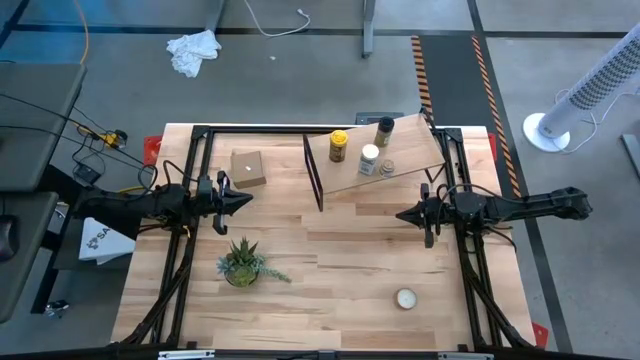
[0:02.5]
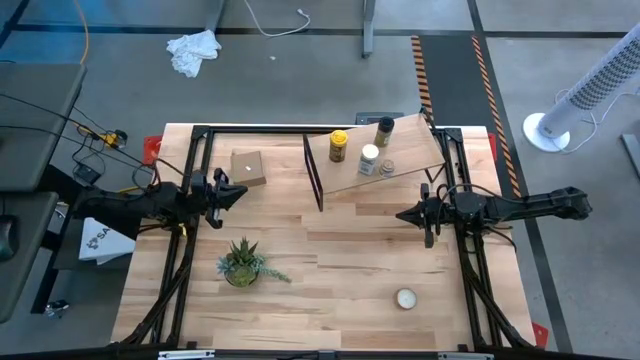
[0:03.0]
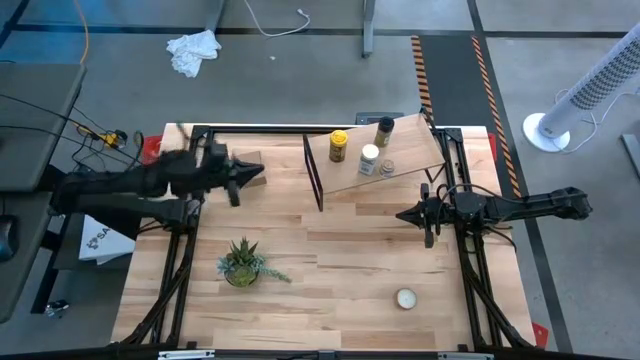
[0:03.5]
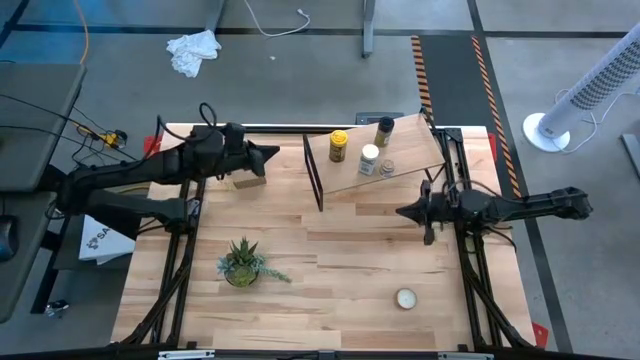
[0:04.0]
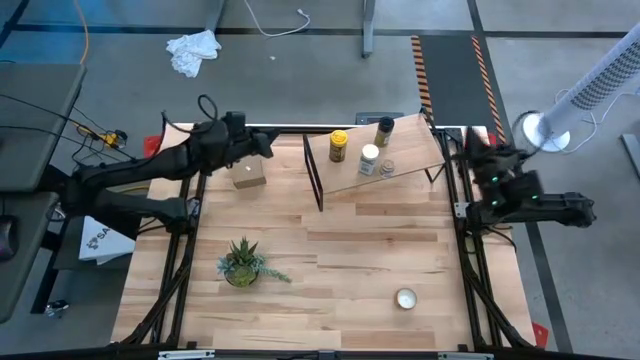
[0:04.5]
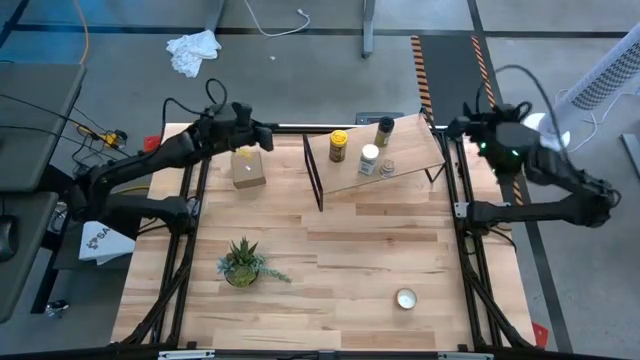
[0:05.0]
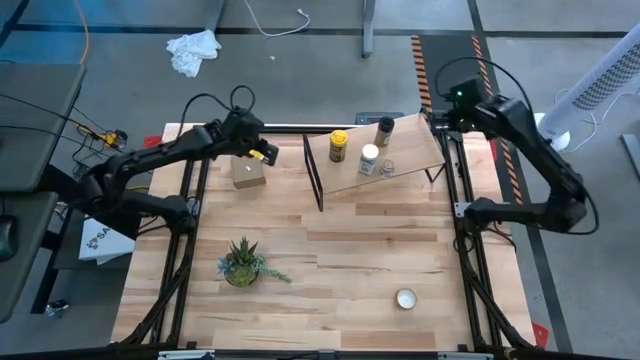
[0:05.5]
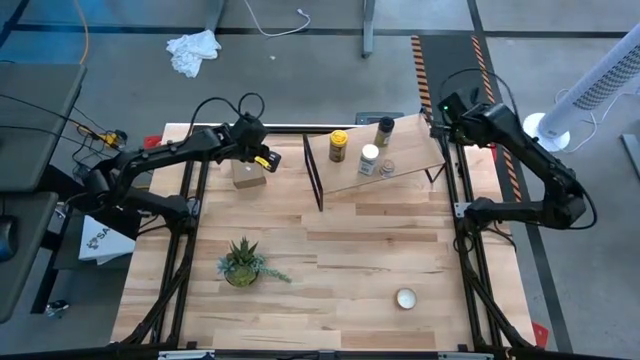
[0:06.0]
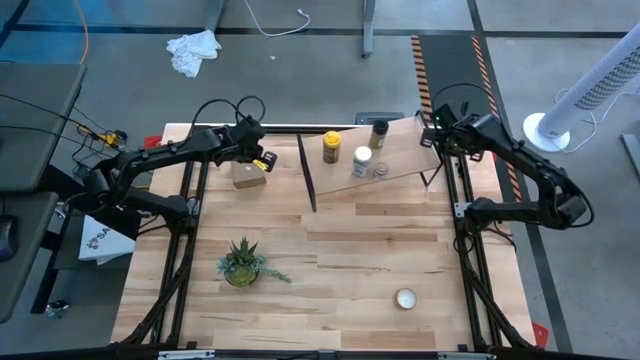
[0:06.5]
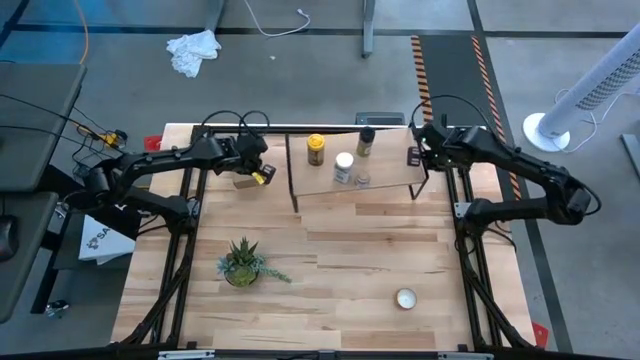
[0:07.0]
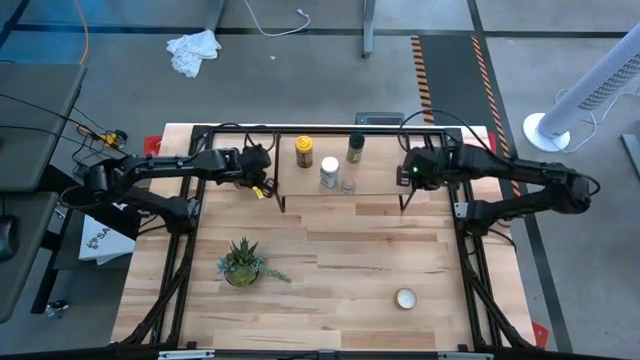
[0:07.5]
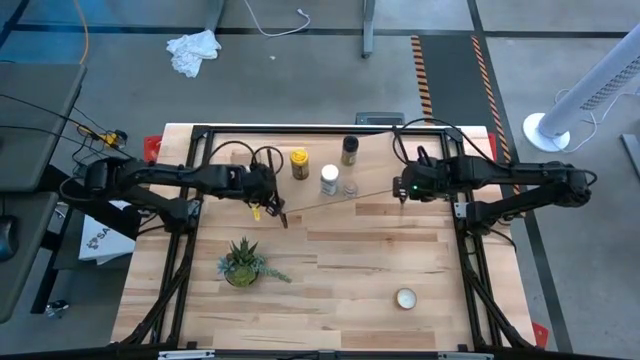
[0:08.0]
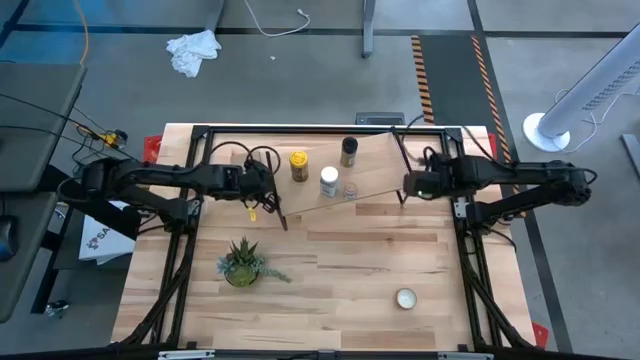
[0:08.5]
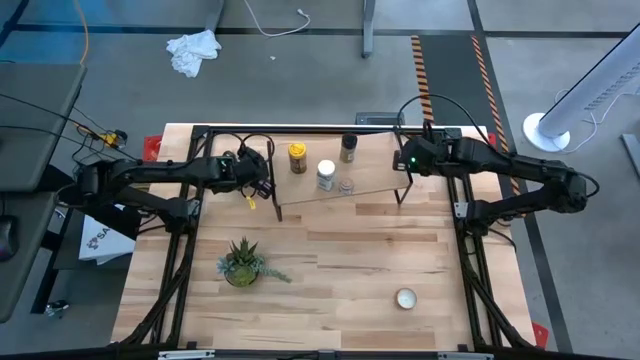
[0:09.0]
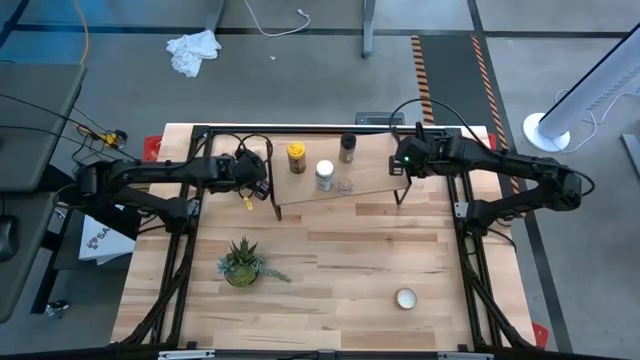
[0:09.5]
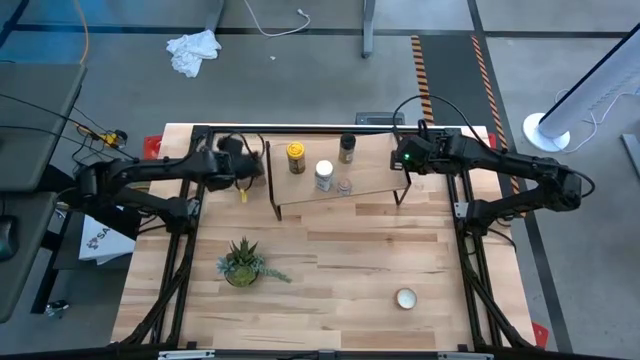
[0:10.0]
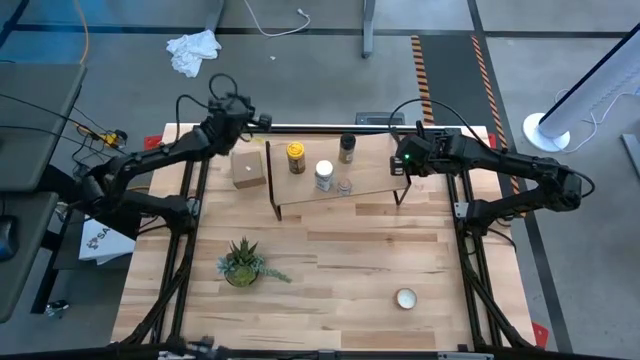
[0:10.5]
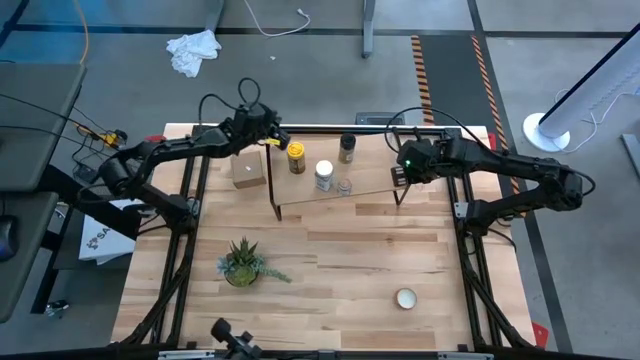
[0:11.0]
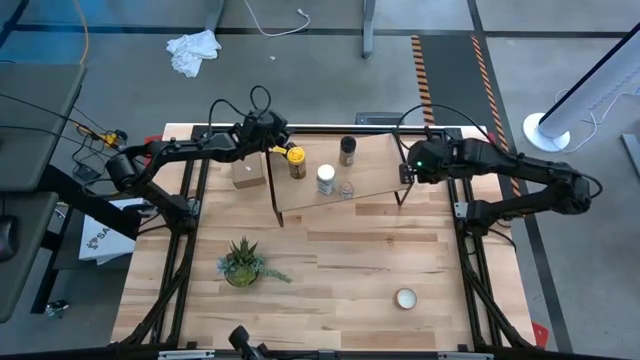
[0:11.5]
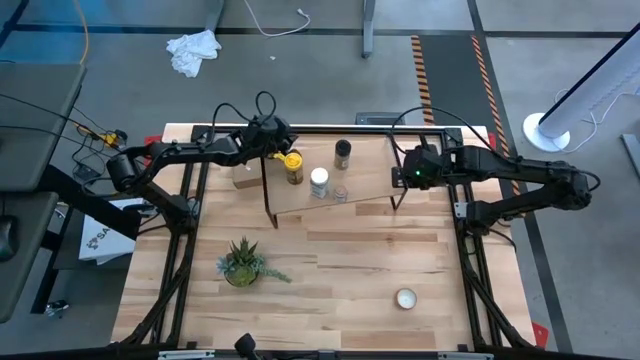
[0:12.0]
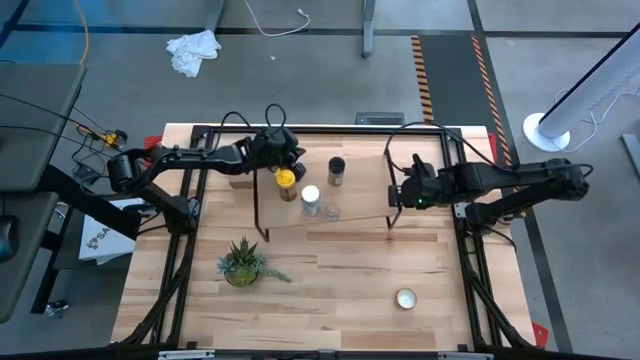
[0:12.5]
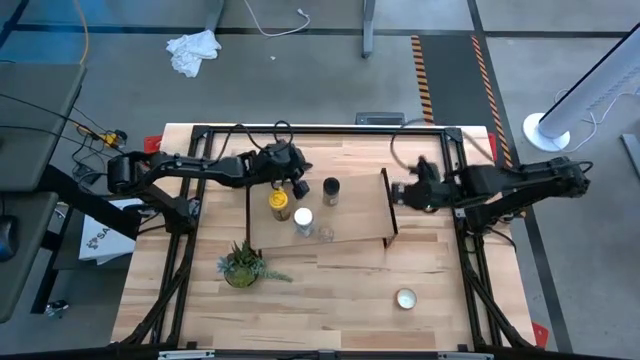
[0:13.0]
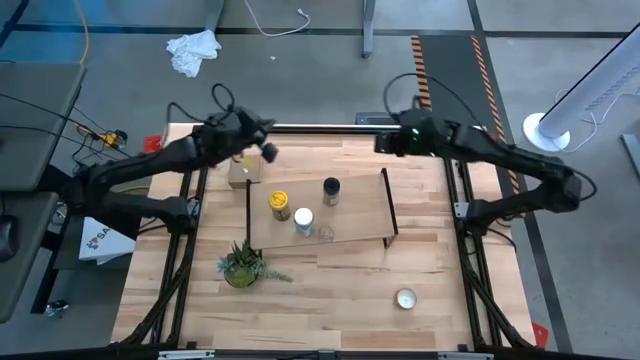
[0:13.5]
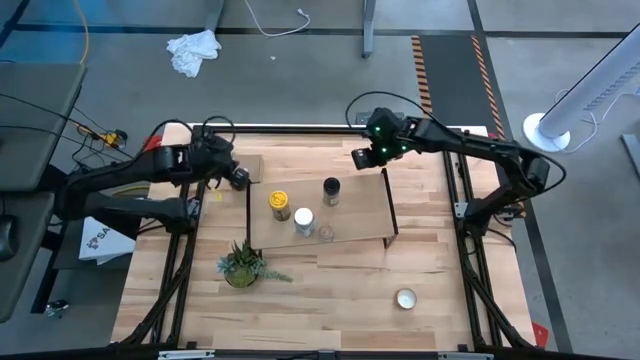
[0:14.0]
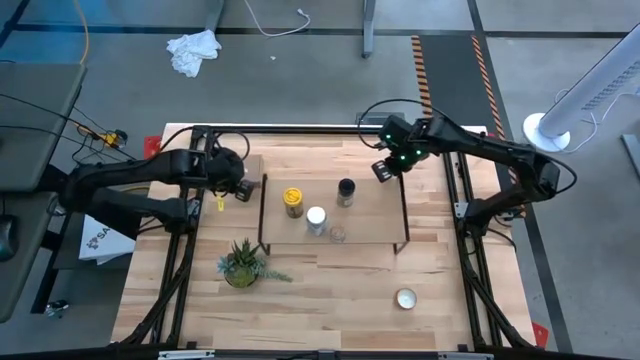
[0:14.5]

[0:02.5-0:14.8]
Task: Shelf spices
Move the shelf to the center of the table

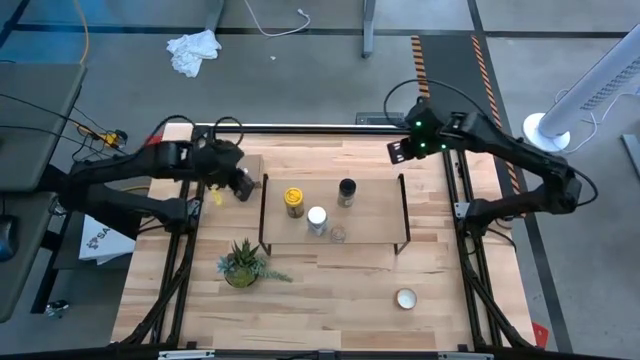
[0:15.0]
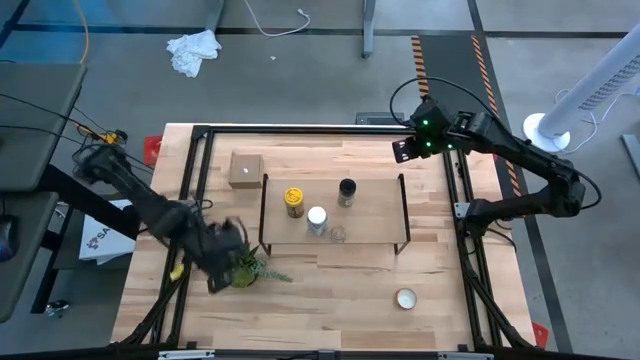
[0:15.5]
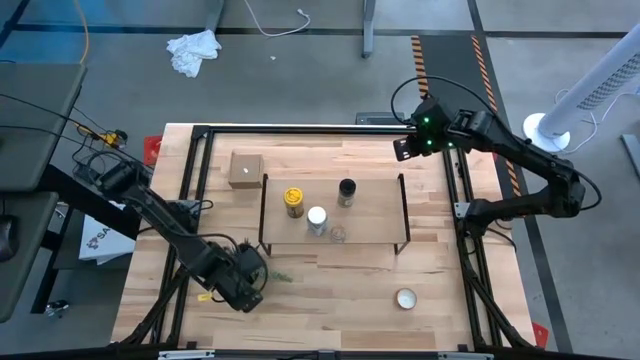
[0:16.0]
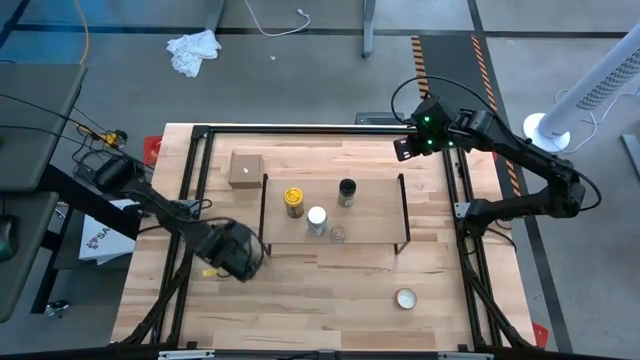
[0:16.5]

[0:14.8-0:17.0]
Move the black vase plant to the middle left of the table

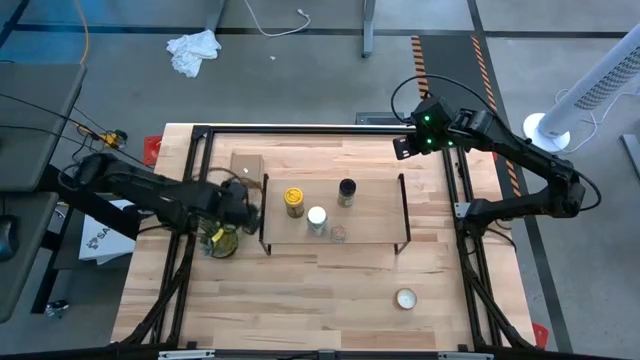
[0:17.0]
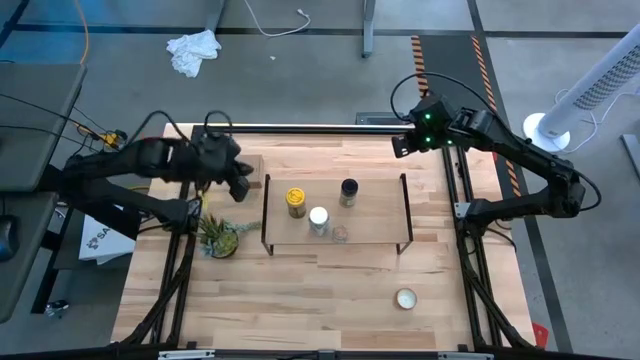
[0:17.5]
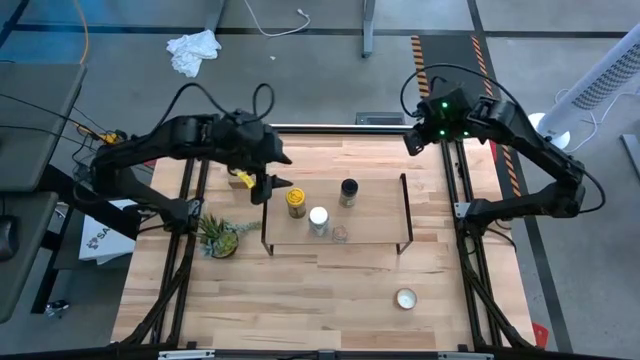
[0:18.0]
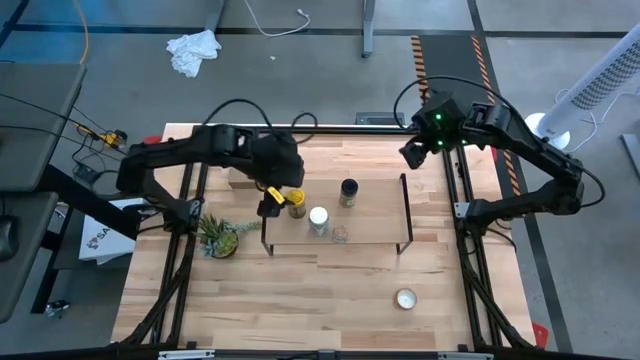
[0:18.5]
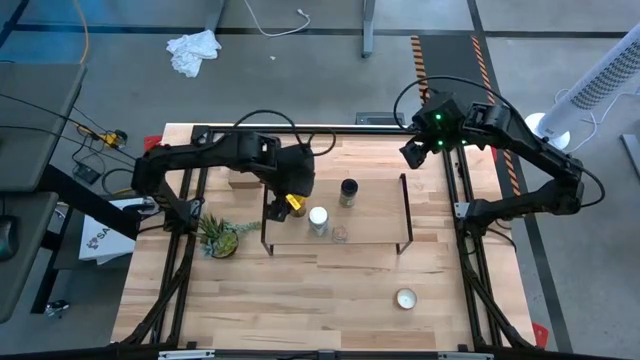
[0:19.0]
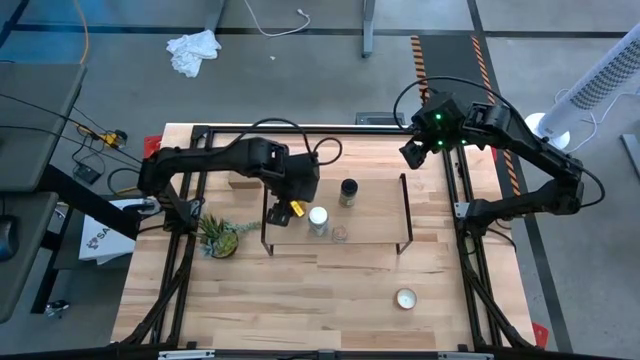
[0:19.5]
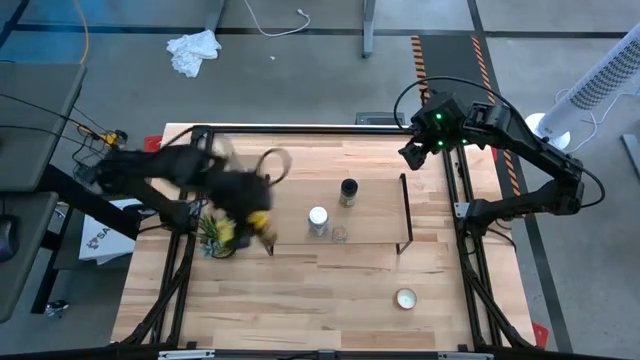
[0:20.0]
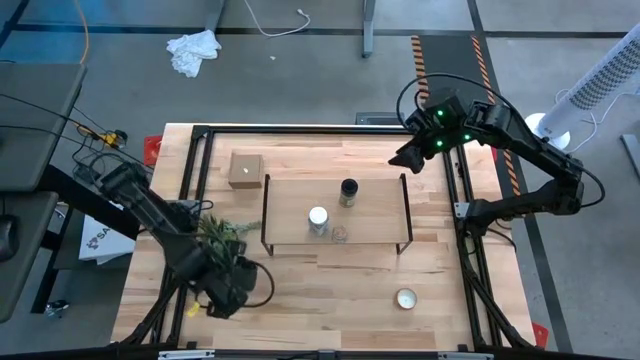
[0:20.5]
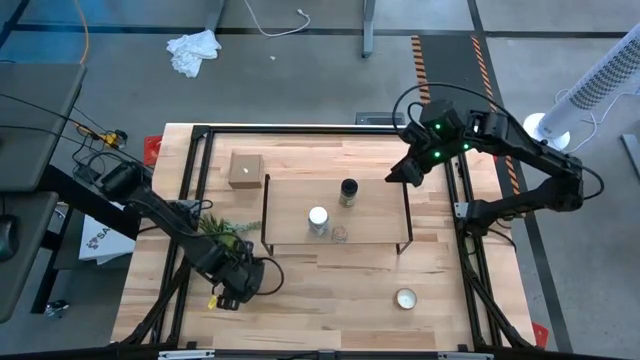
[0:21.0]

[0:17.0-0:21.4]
Remove the yellow seasoning bottle from the shelf

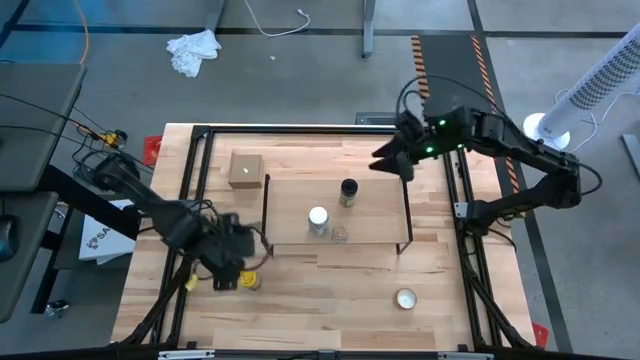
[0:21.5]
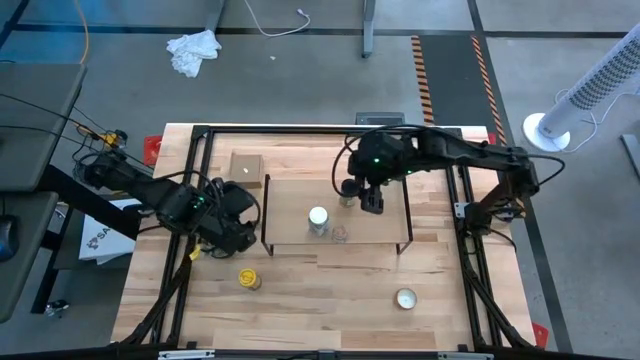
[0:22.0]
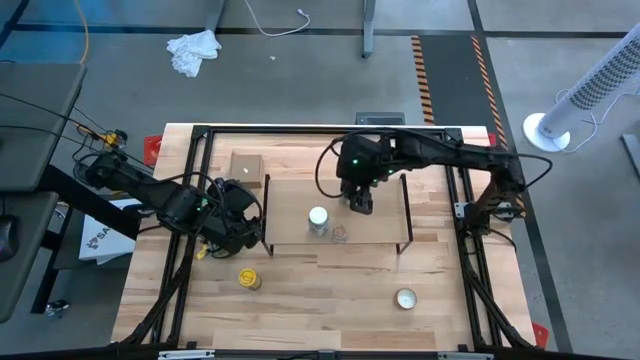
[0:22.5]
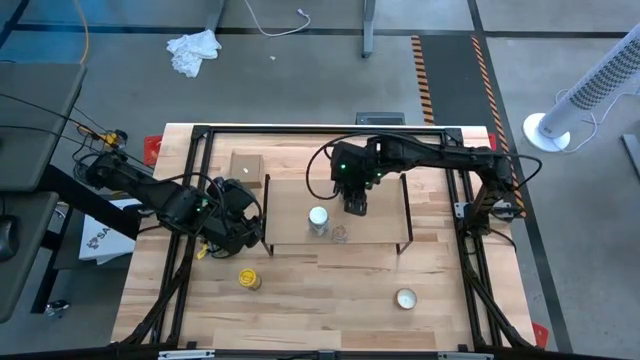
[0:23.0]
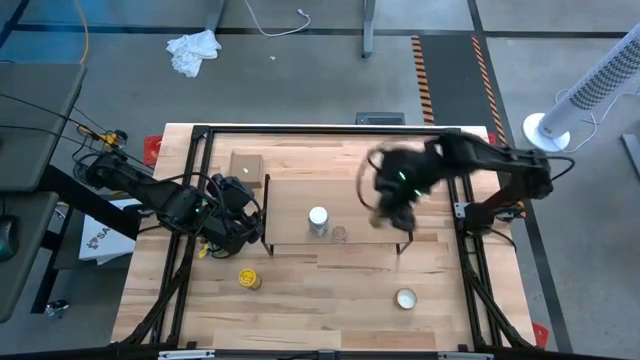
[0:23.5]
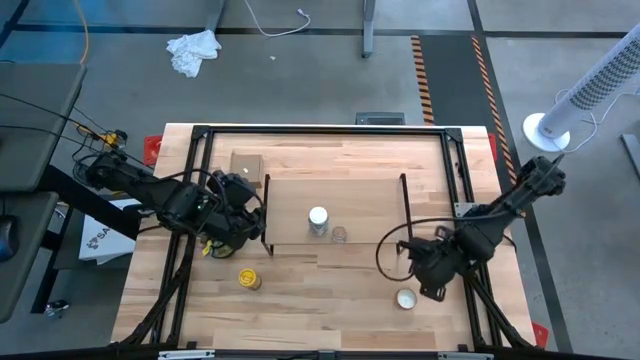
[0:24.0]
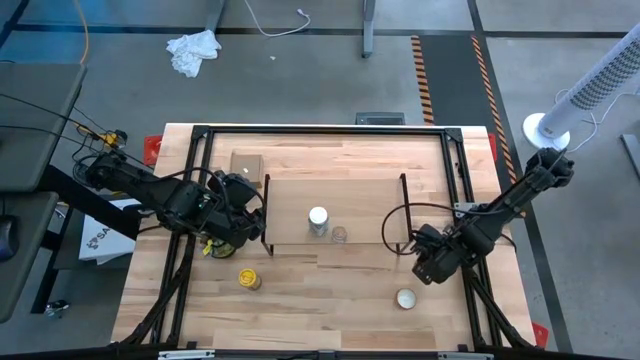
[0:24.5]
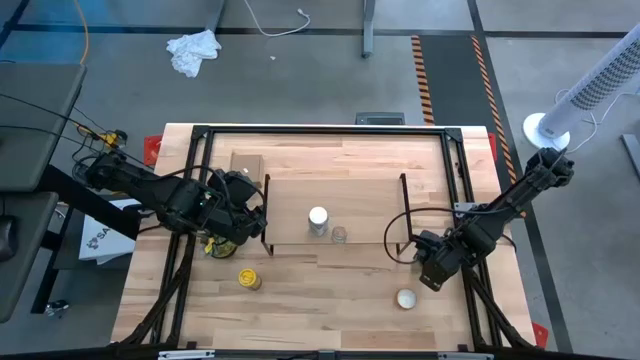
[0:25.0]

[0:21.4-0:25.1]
Remove the black seasoning bottle from the shelf
